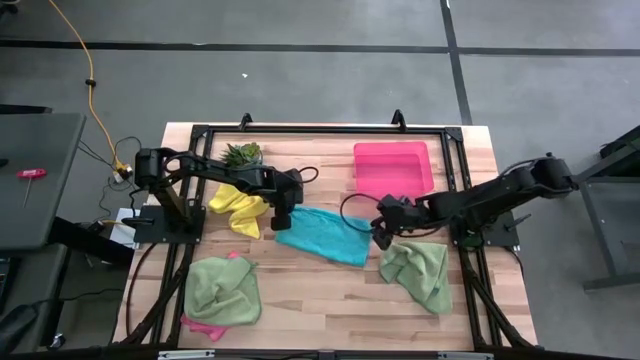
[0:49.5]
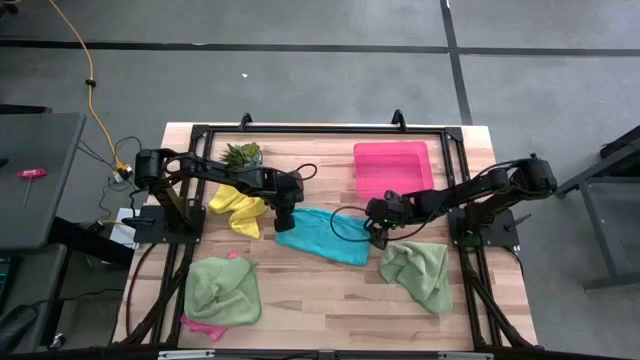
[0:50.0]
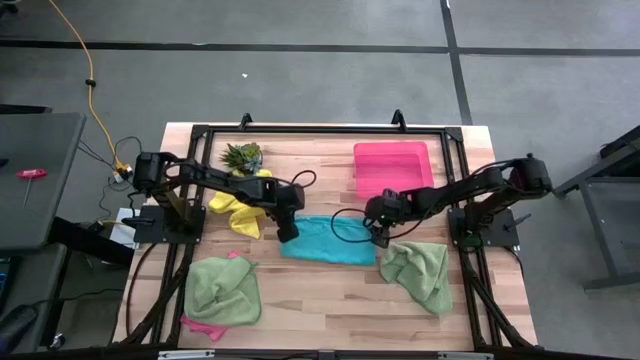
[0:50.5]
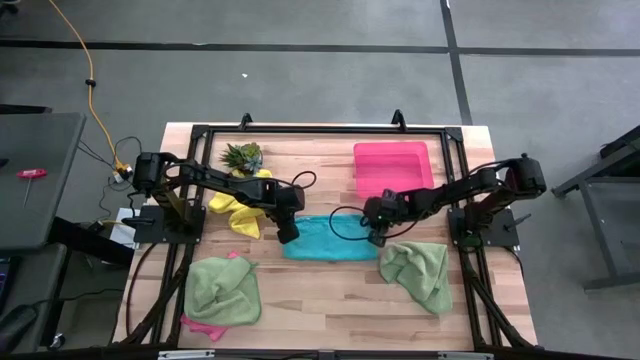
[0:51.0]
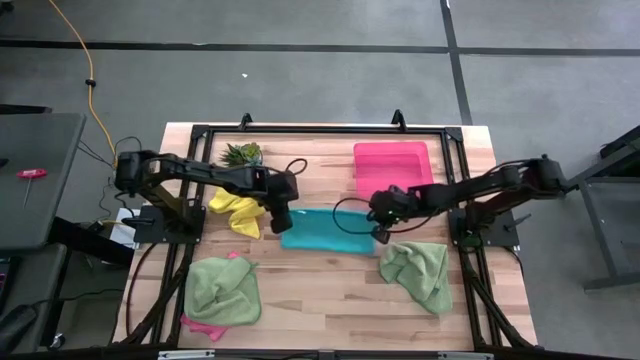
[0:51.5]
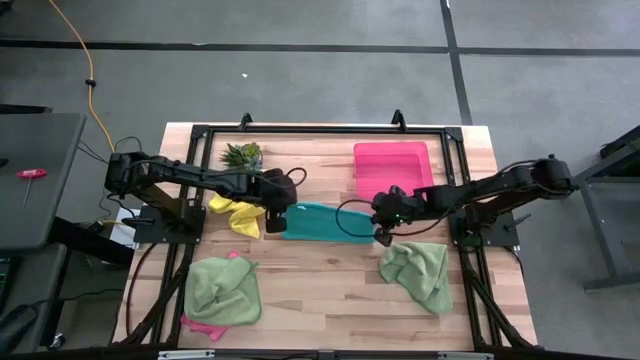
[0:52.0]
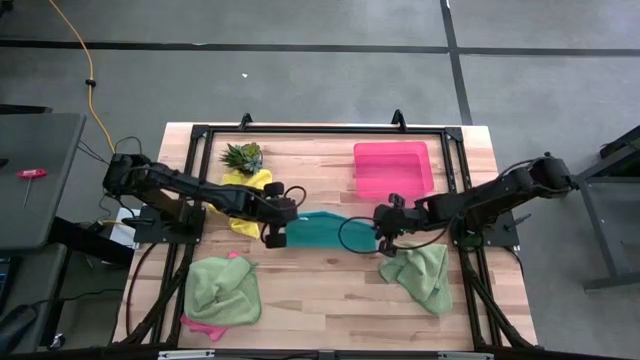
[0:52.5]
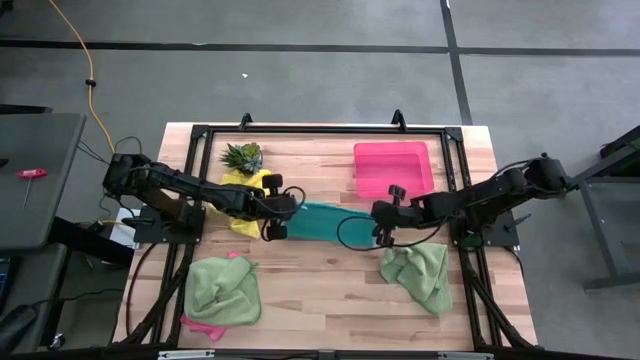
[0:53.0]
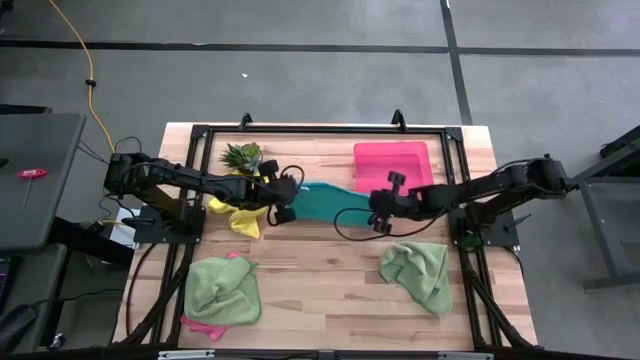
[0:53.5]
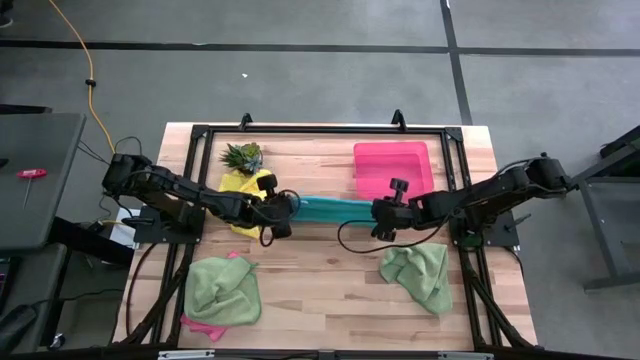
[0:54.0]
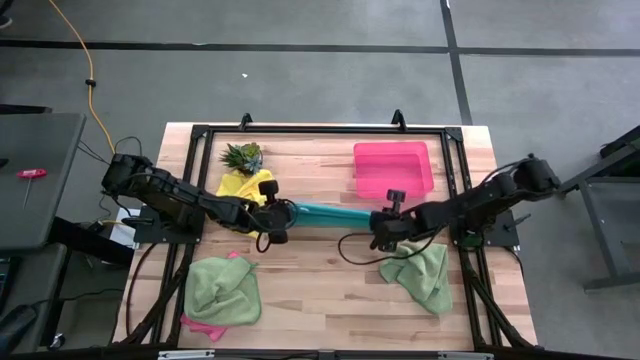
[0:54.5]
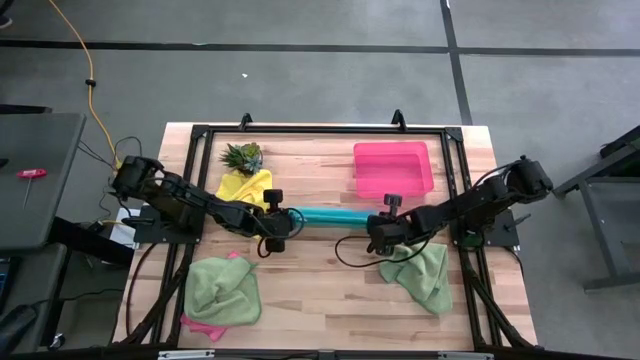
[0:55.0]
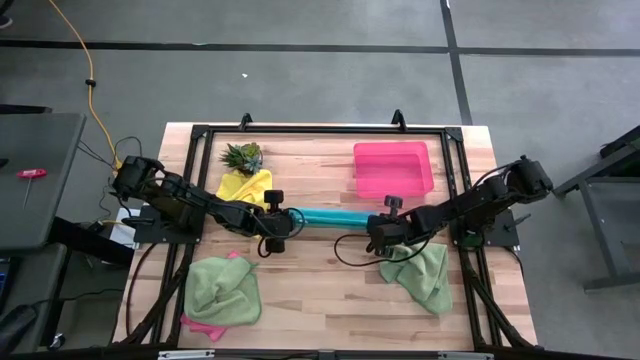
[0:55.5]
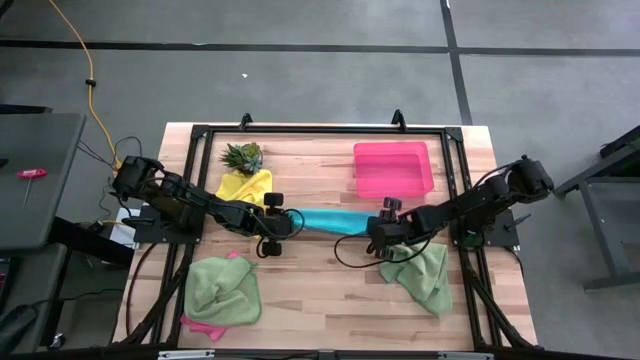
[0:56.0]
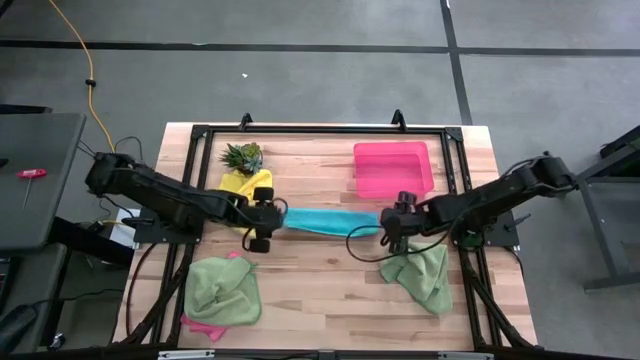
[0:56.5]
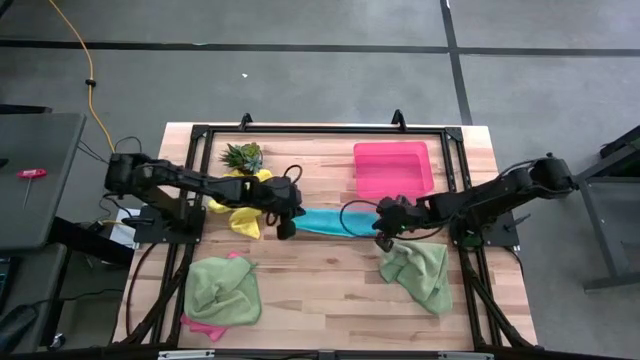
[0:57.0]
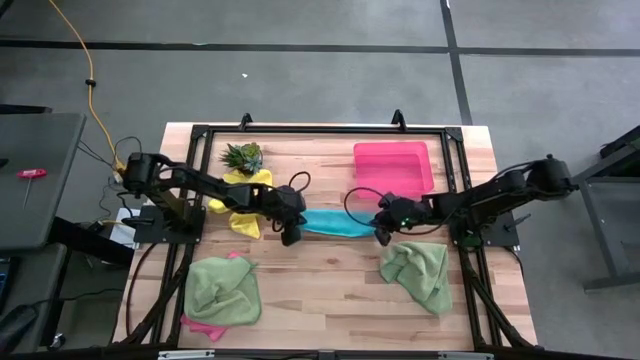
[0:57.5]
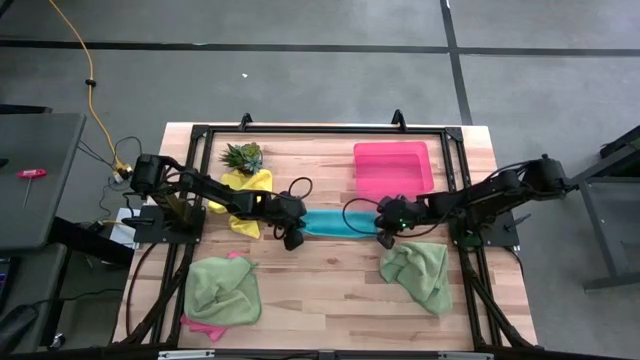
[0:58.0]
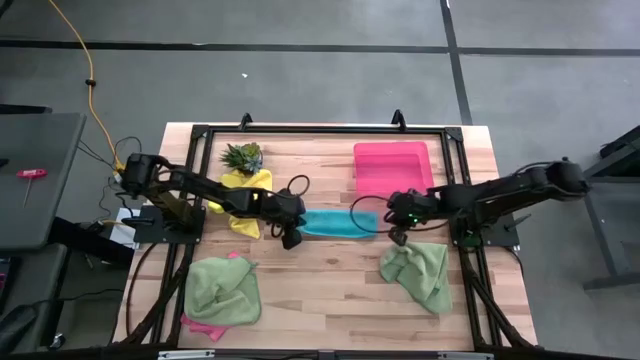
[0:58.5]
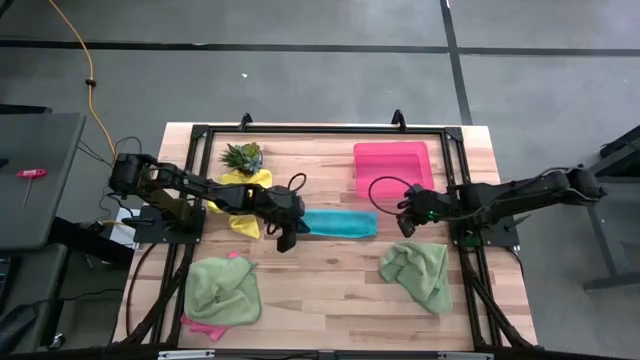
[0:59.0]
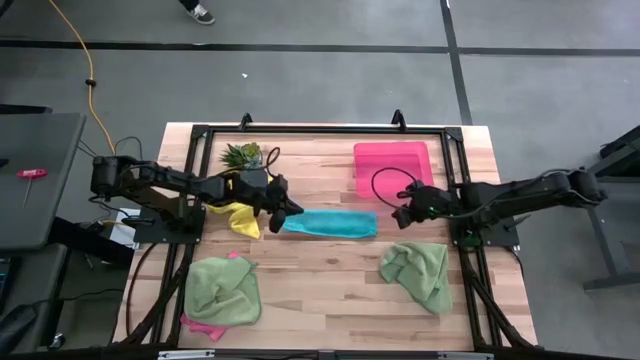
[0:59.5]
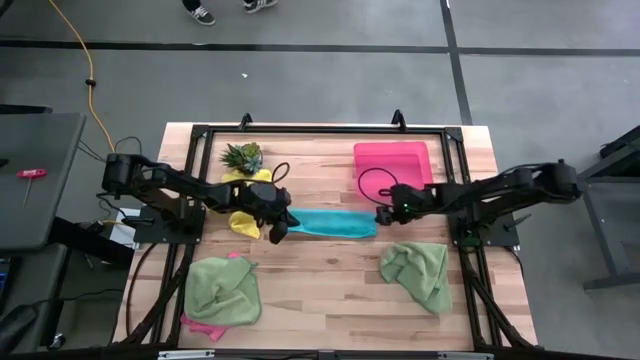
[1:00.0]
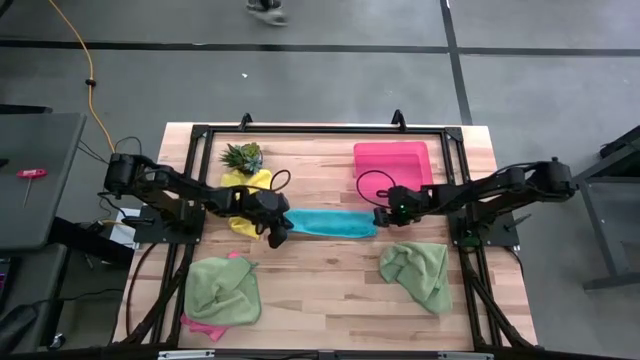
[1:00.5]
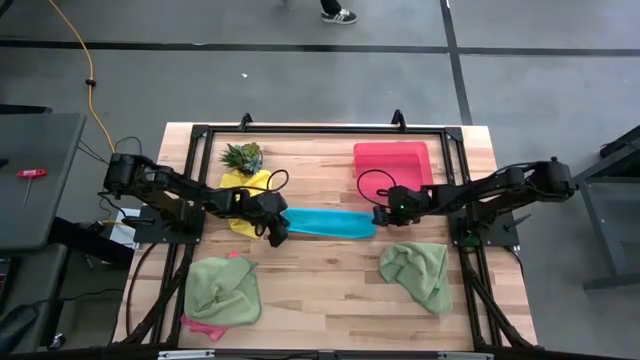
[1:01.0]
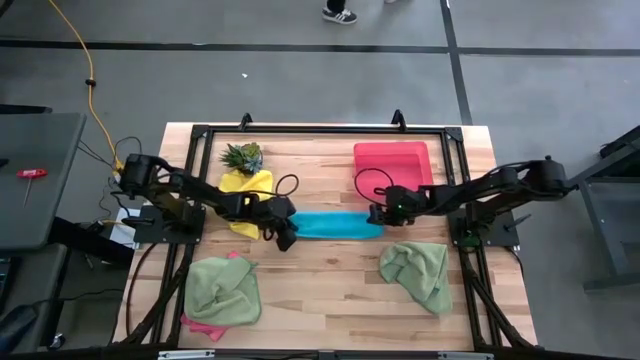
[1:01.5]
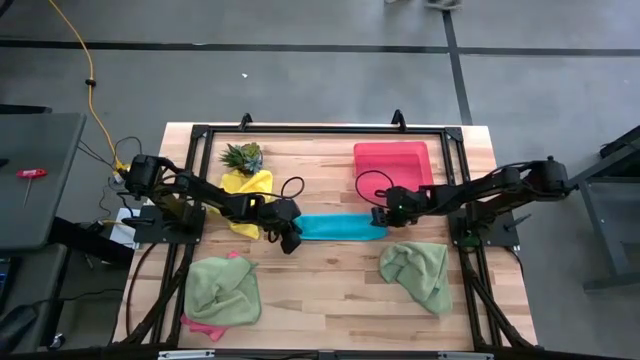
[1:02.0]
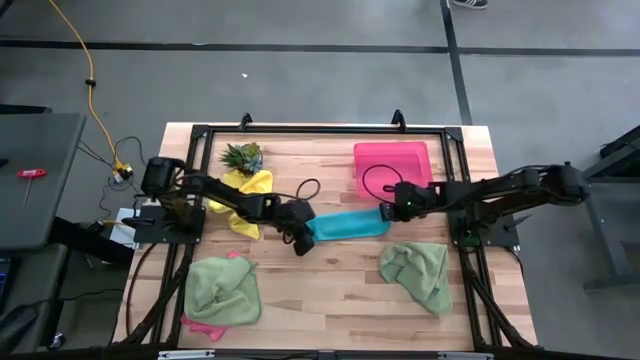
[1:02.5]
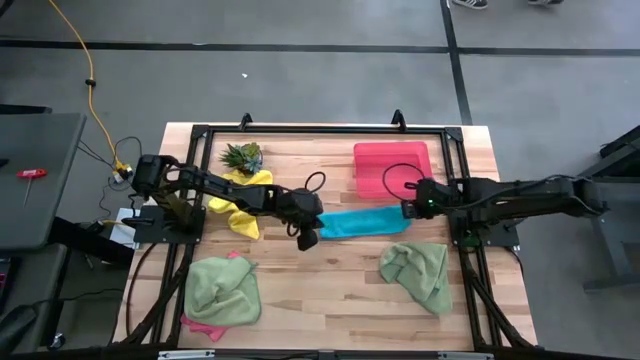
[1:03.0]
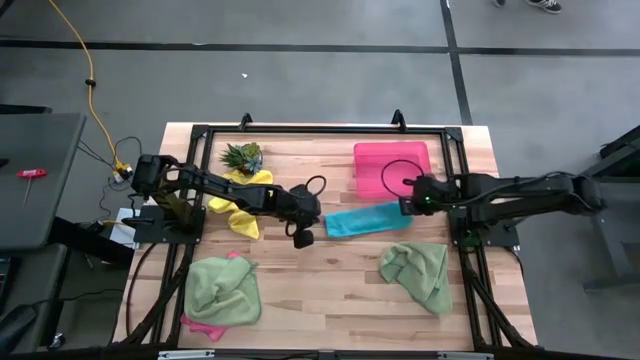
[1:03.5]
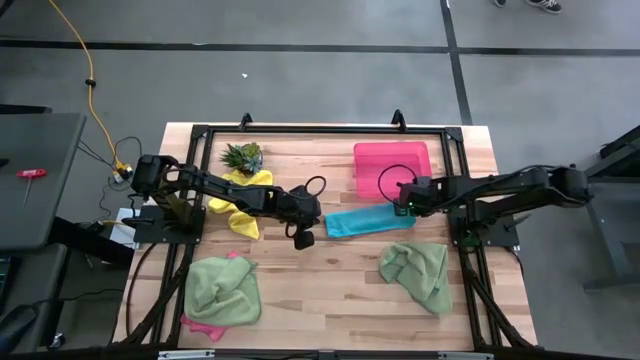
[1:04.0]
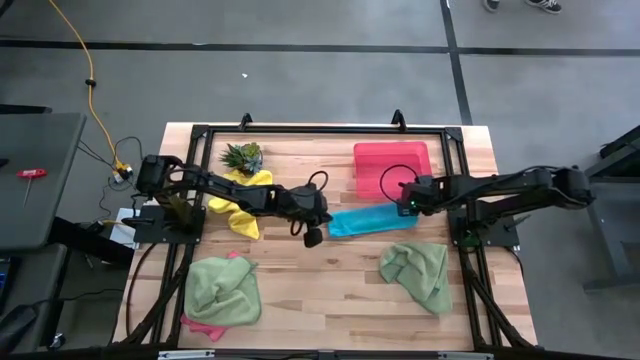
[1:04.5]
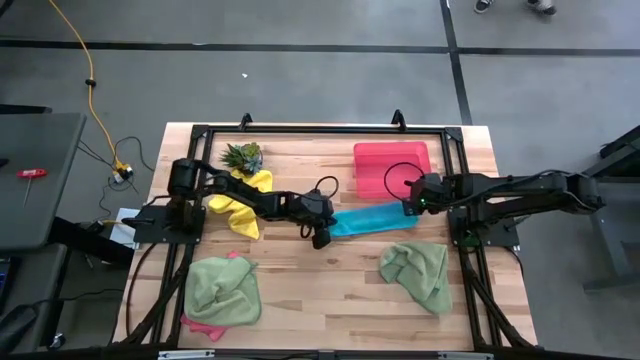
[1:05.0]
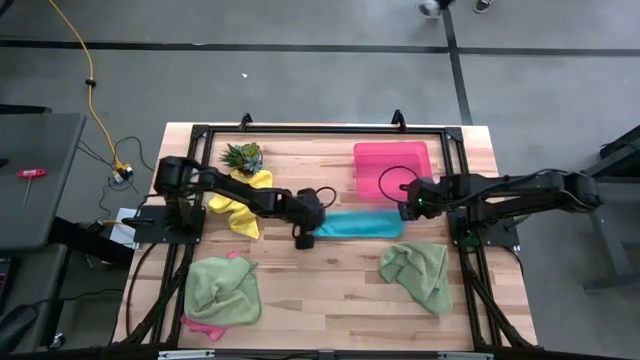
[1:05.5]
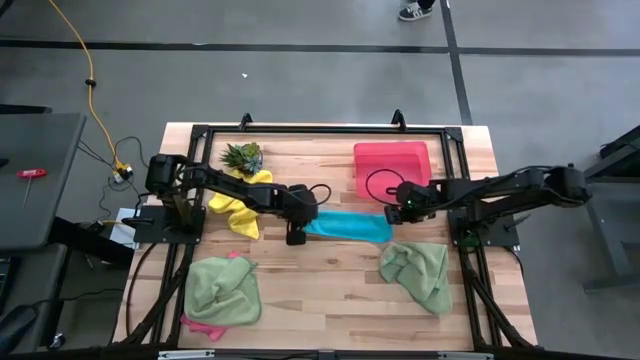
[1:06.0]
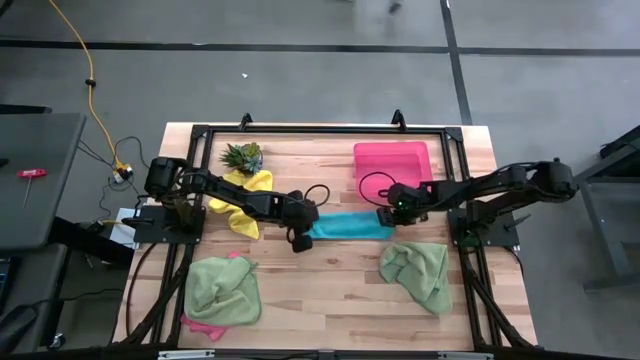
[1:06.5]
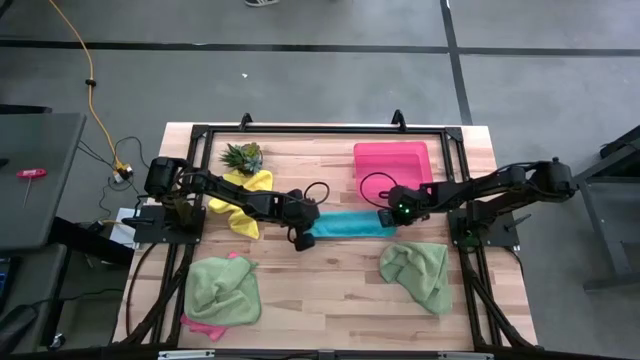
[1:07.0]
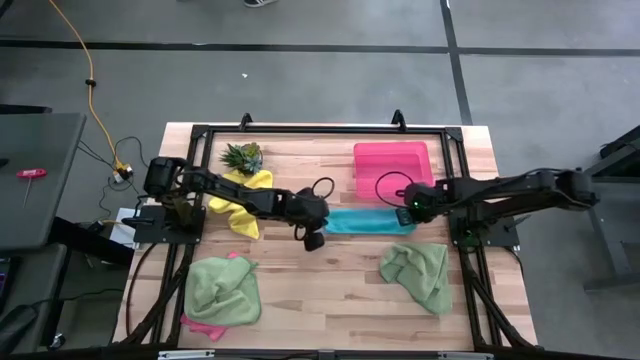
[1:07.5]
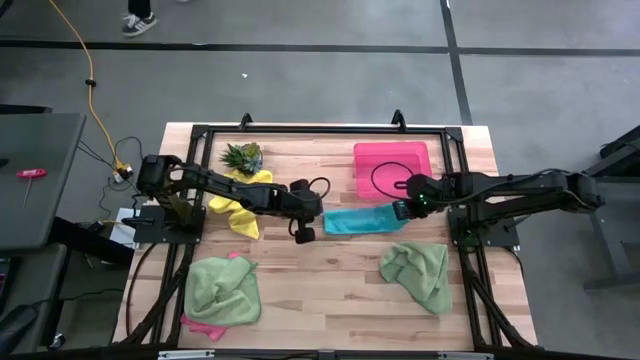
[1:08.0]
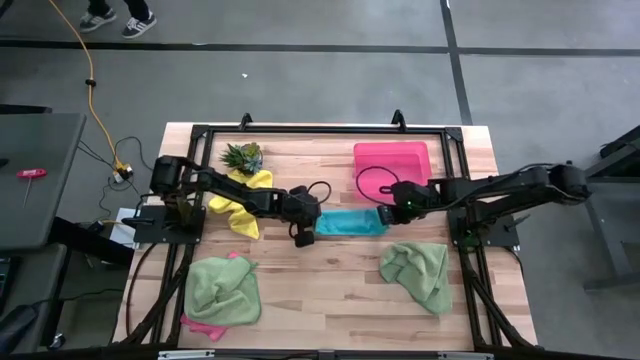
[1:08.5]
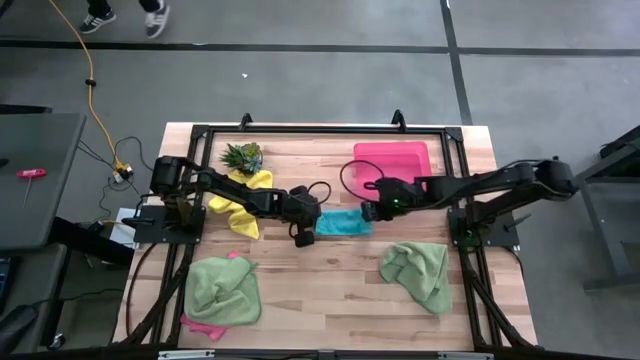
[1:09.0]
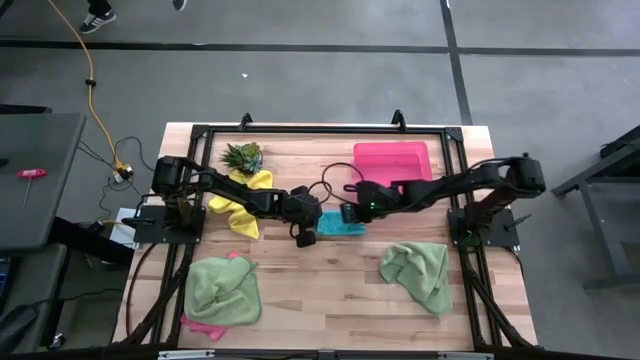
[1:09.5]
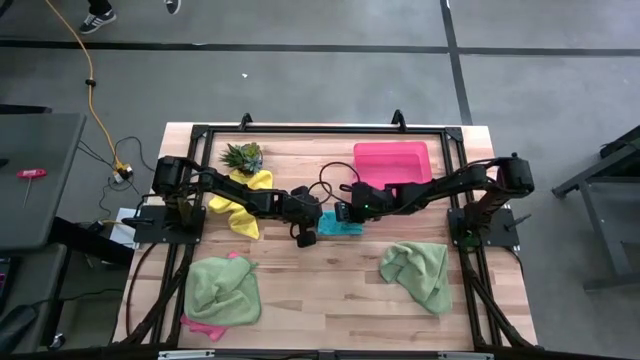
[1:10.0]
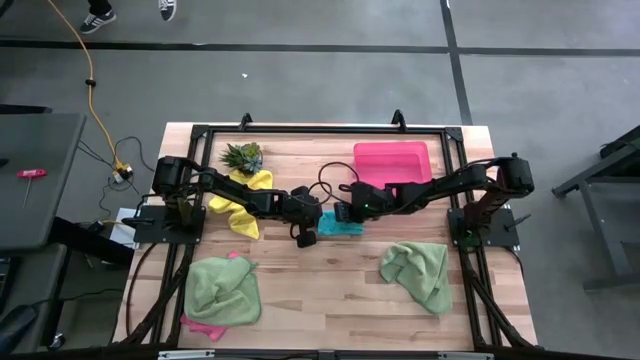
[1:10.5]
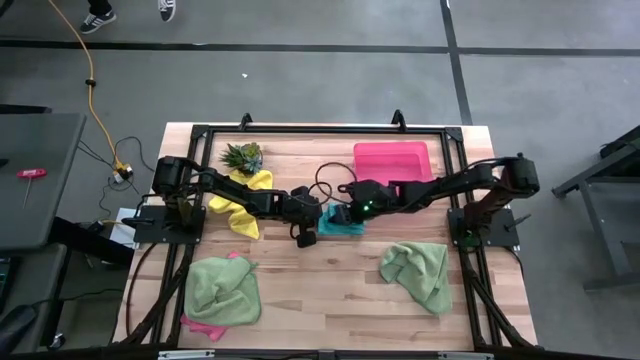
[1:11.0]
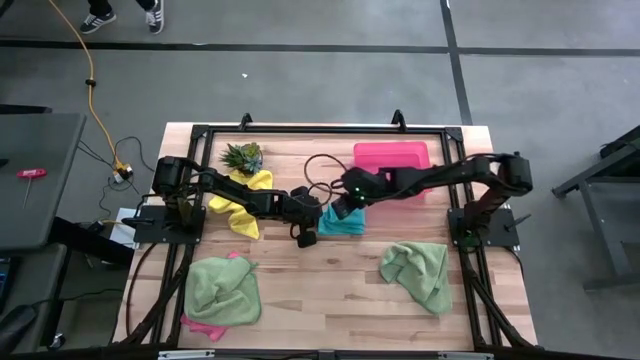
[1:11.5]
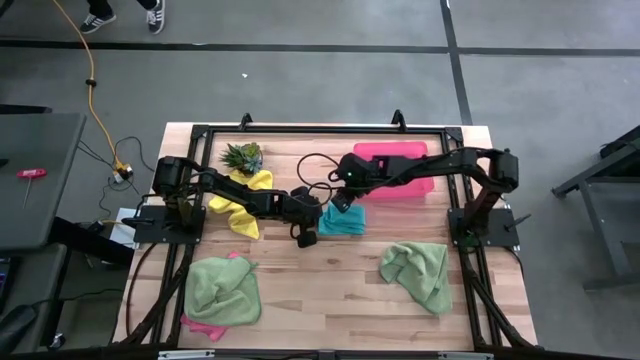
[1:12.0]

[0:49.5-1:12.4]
Task: Fold microfiber towels
Fold the blue microfiber cloth
